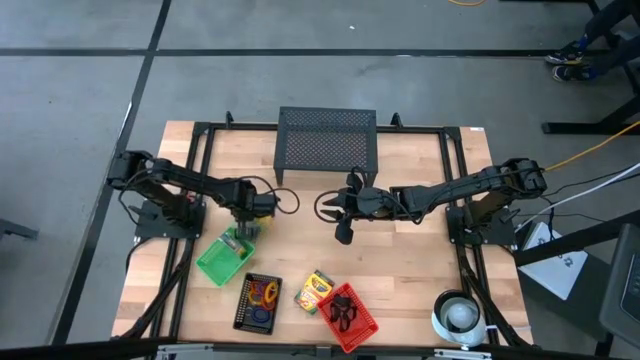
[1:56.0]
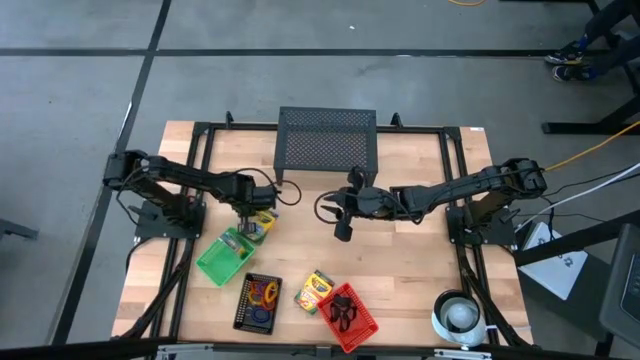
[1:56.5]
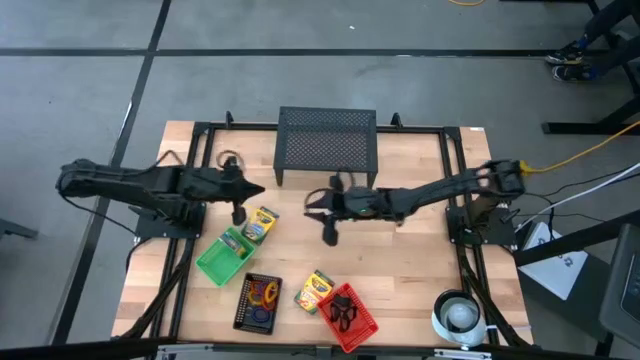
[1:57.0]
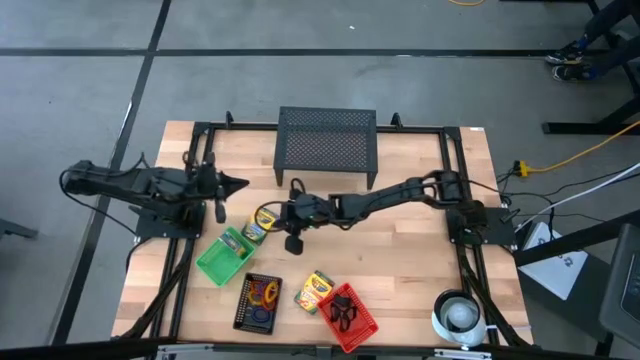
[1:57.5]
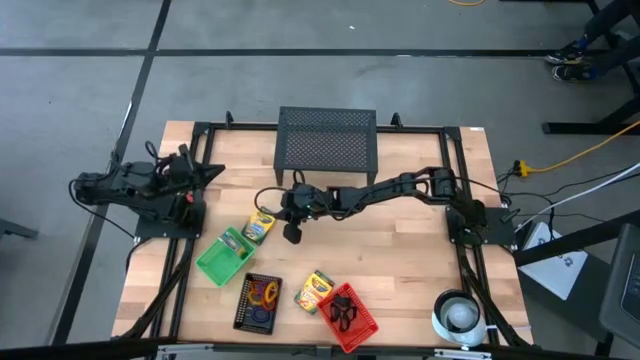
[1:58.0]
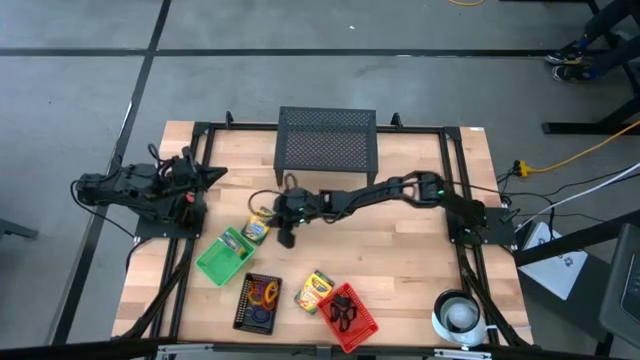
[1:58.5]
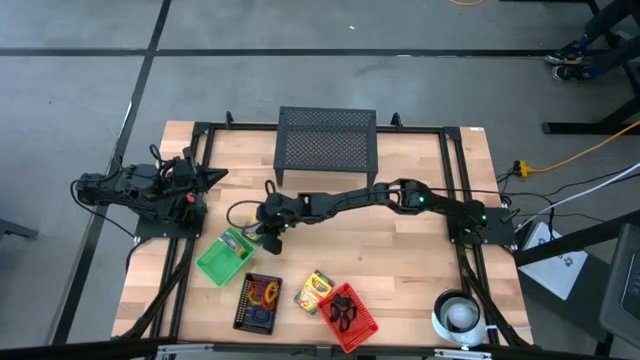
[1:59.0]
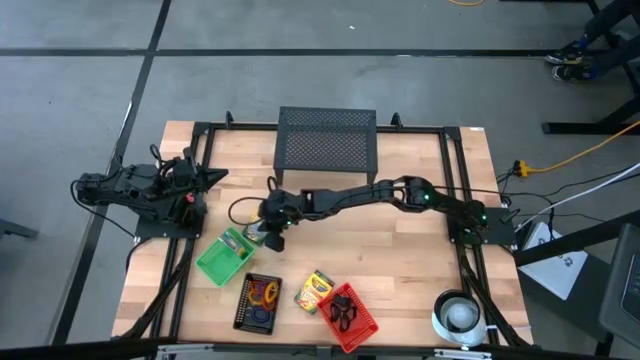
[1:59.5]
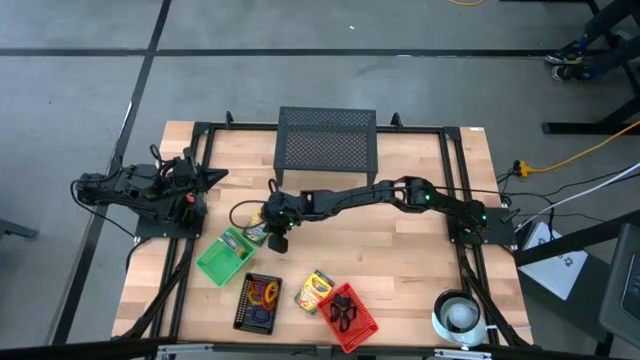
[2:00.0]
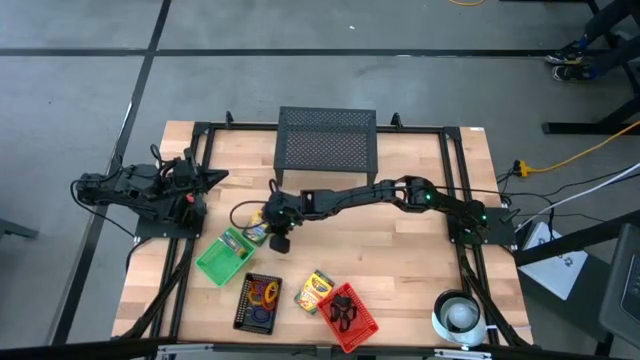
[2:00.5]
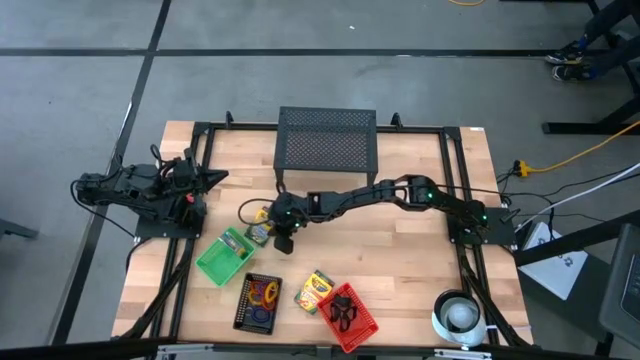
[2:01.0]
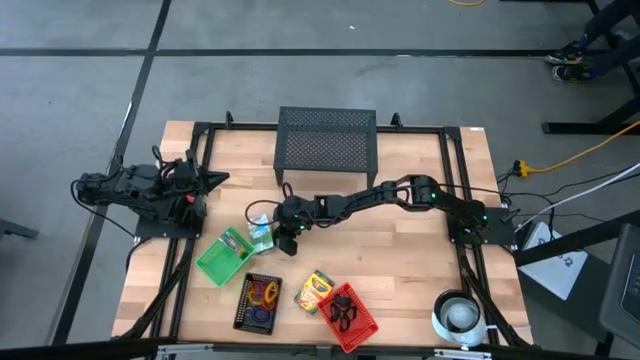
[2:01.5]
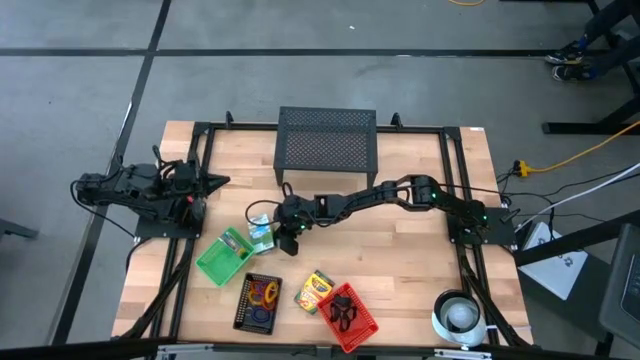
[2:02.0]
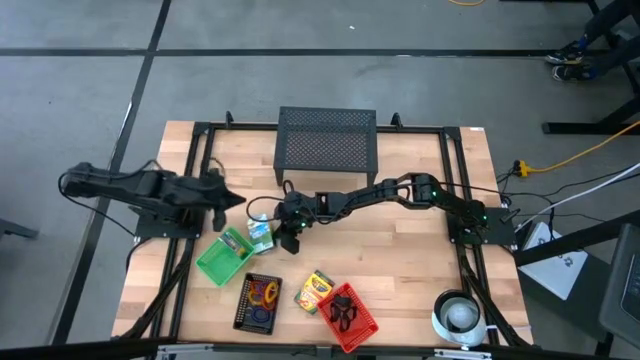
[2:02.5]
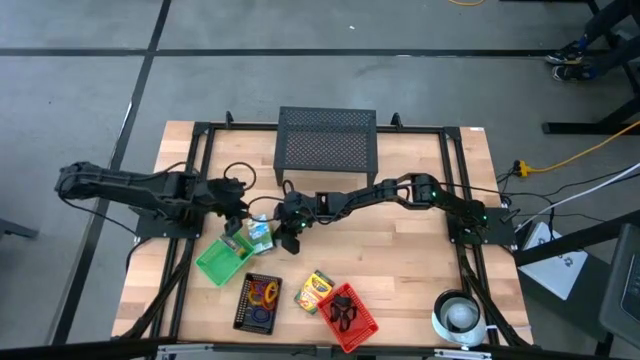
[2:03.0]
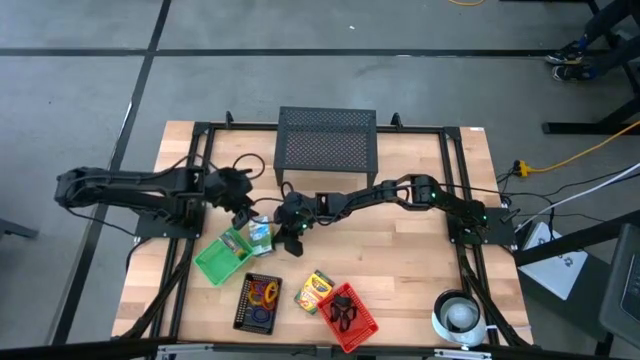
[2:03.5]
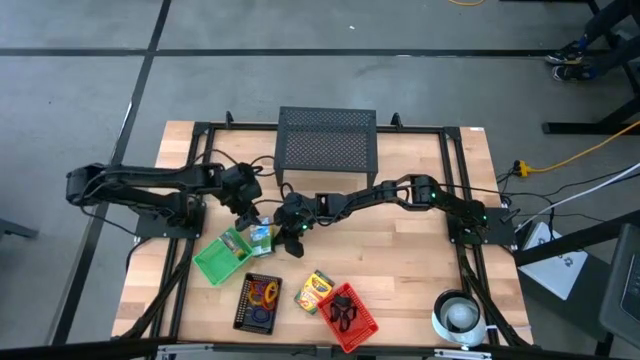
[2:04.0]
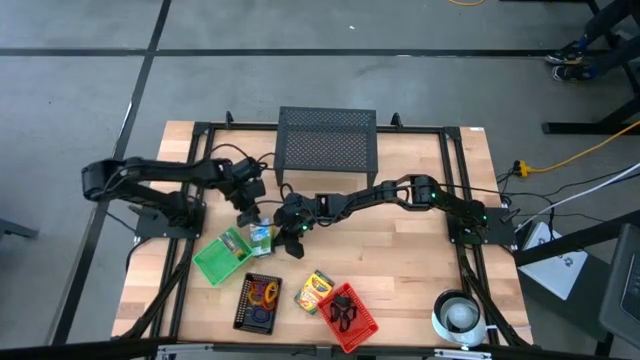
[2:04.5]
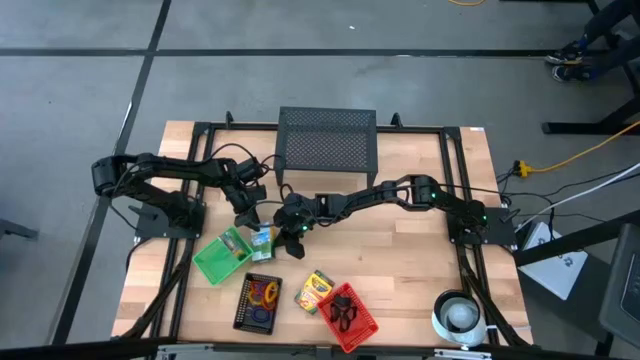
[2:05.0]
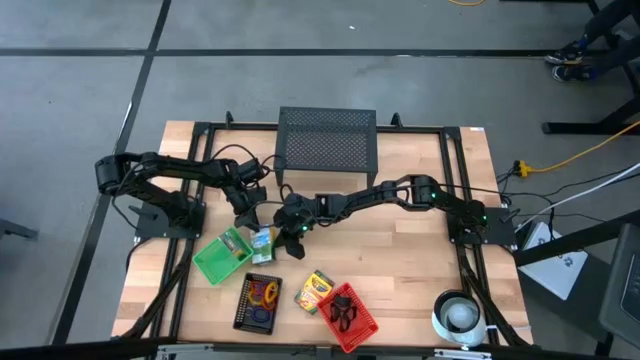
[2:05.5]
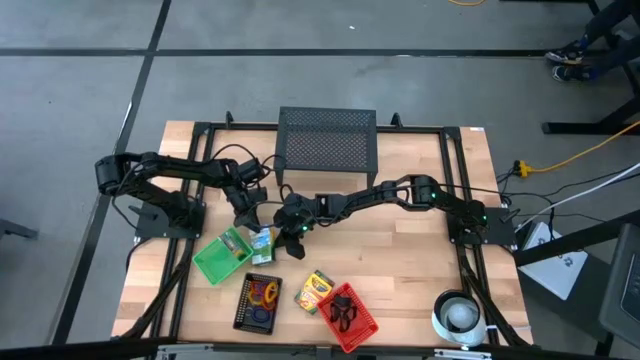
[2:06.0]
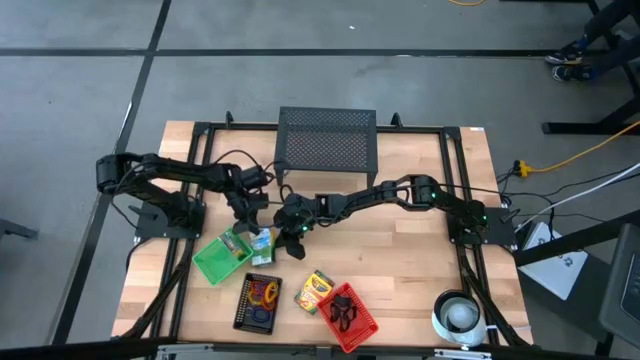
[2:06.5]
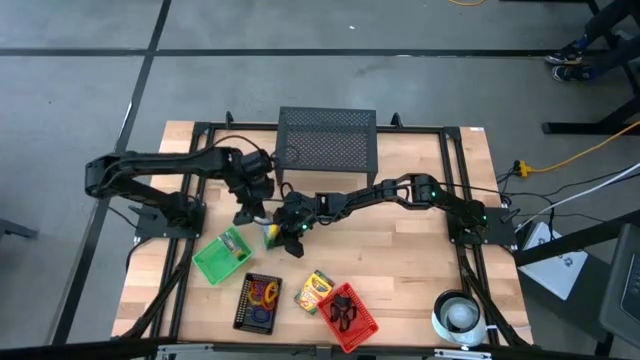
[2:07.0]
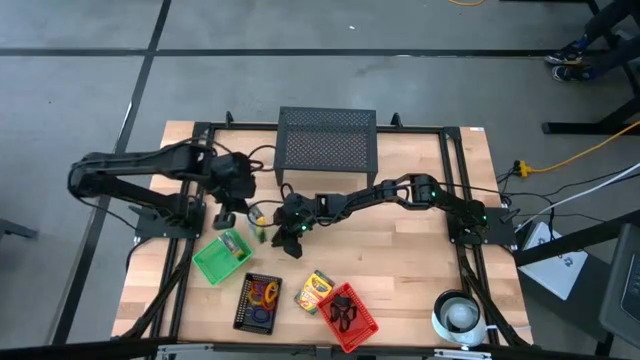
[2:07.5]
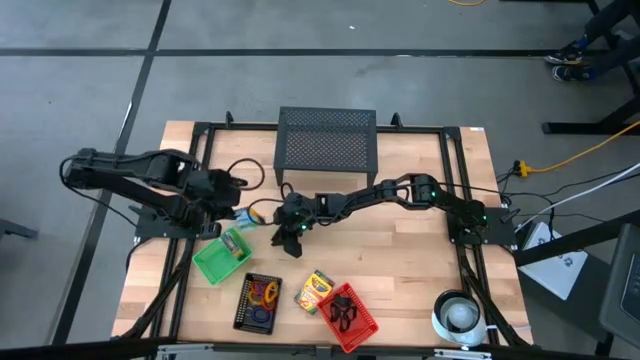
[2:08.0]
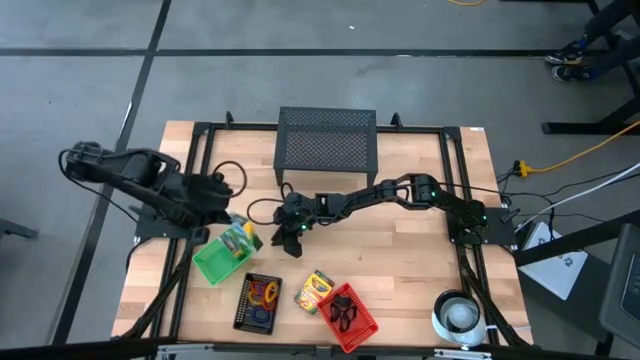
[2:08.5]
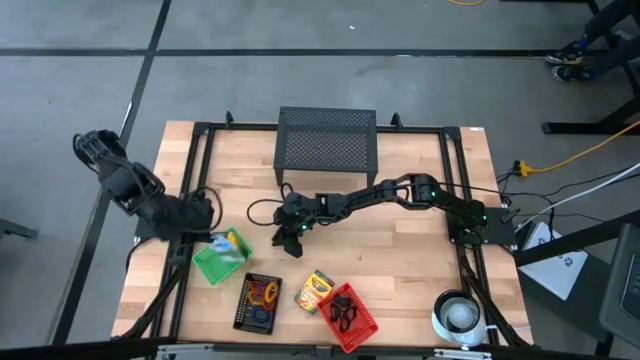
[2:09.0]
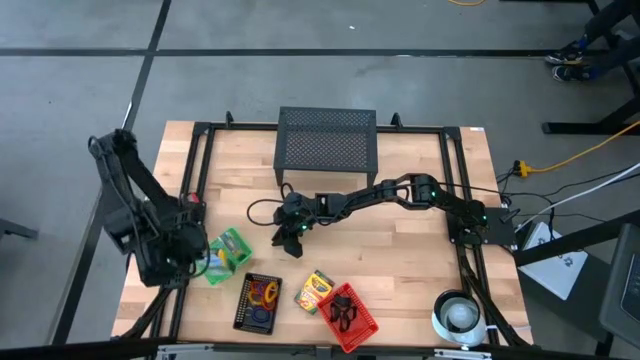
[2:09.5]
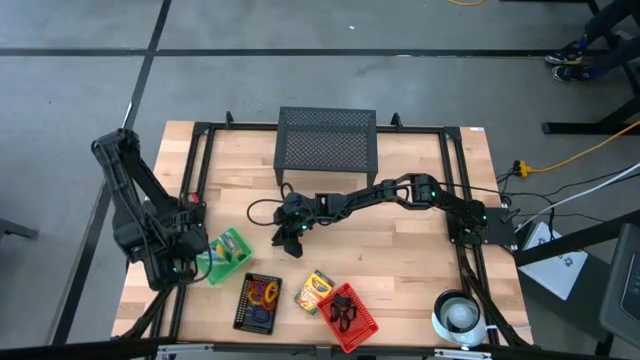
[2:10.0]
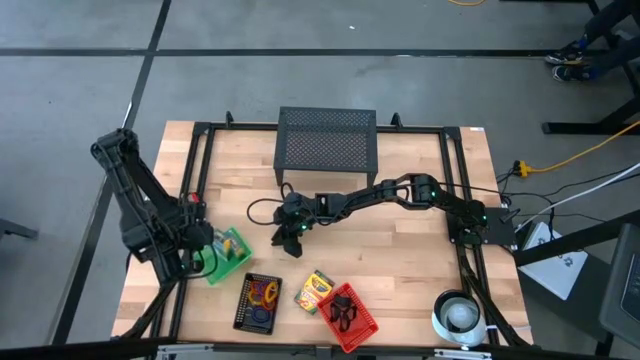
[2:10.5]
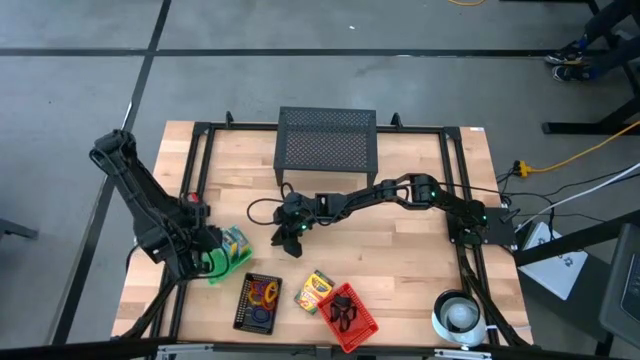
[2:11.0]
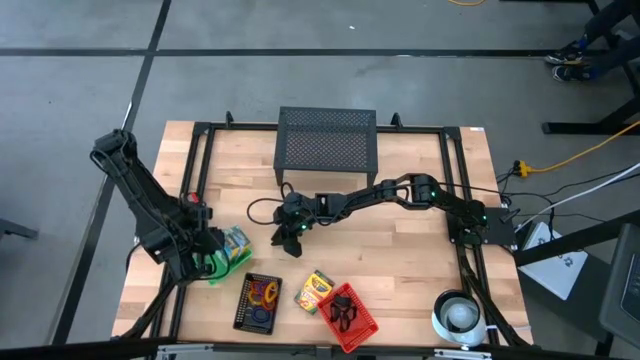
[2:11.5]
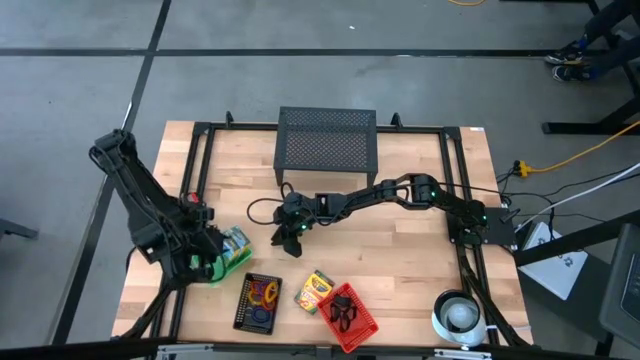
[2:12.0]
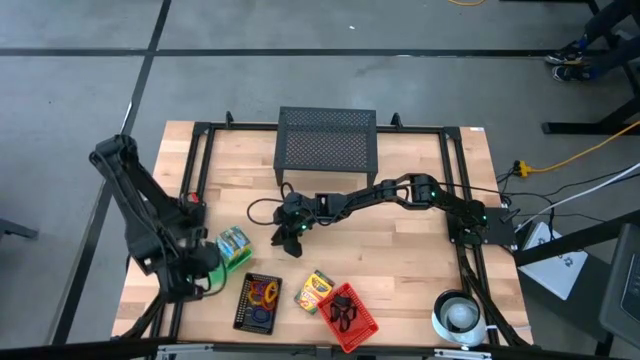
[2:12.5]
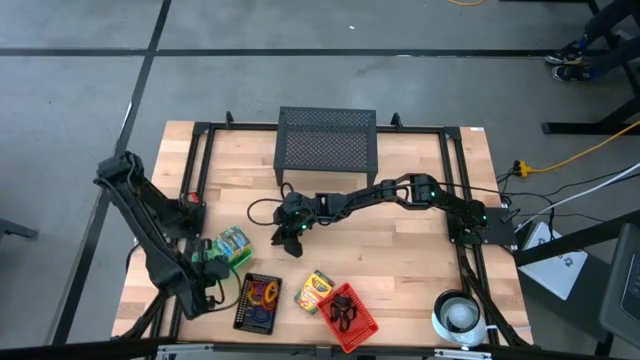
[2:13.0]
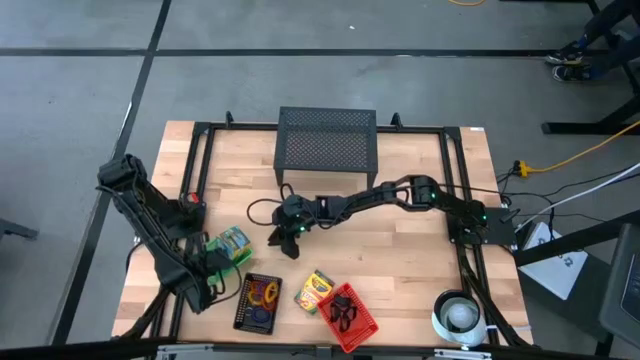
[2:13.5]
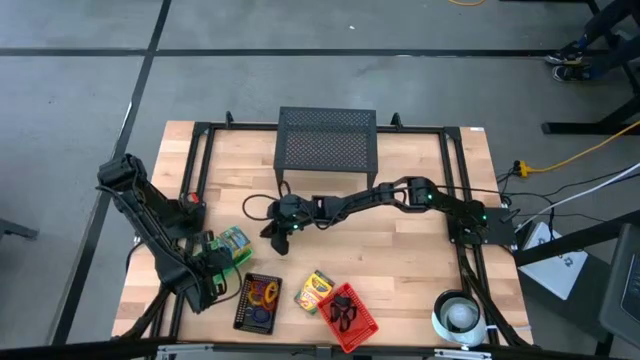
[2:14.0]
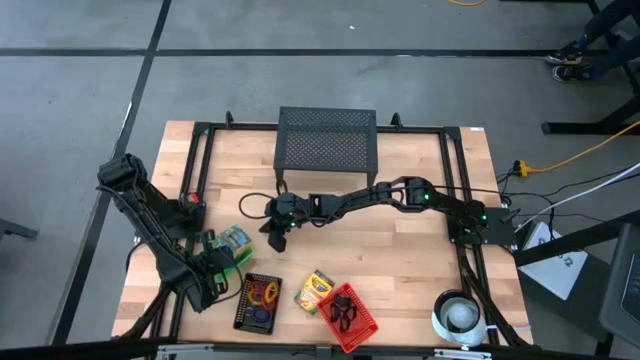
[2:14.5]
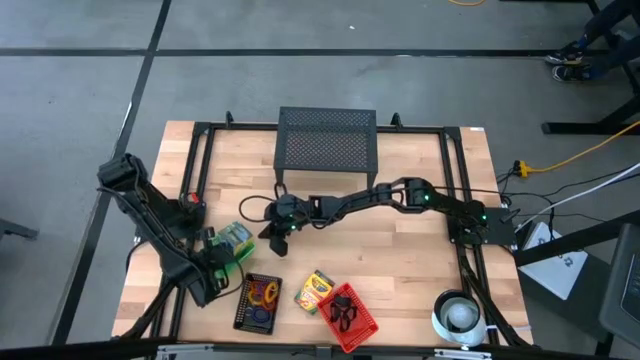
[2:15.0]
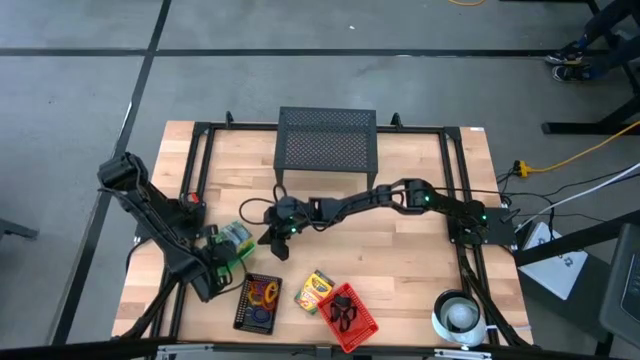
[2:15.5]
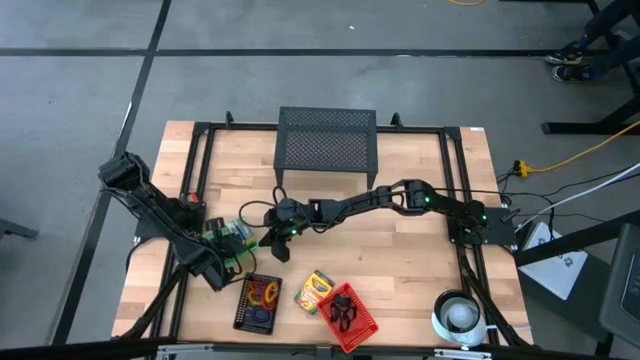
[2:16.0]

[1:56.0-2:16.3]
Task: Pick & Place Office Desk Supplies
Put the yellow crayon box into the green bin

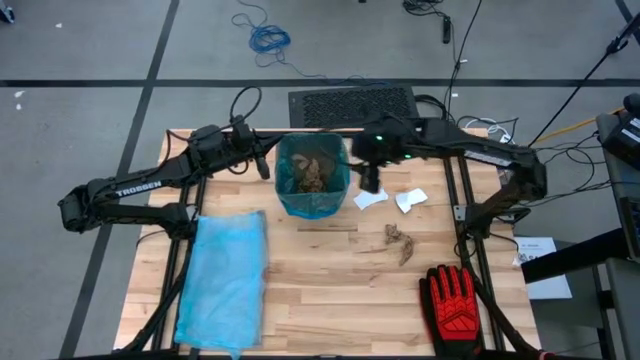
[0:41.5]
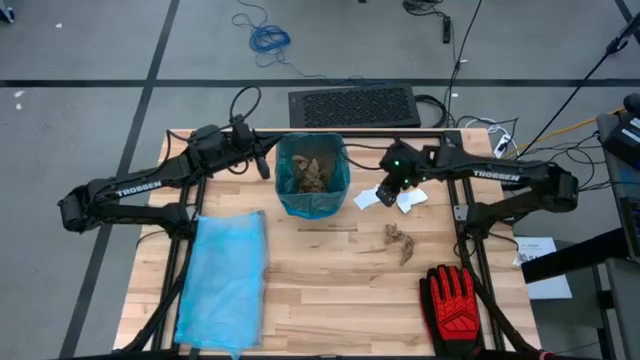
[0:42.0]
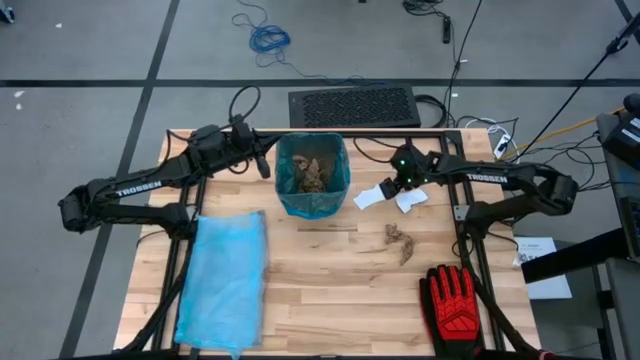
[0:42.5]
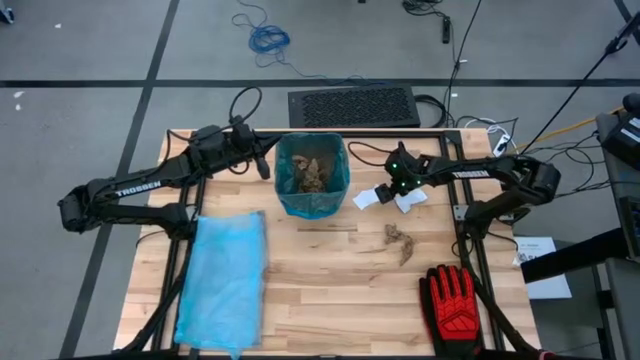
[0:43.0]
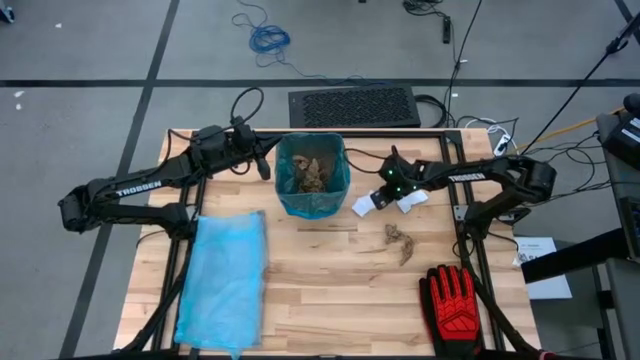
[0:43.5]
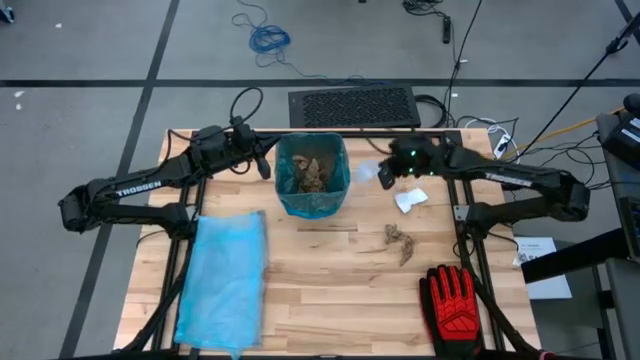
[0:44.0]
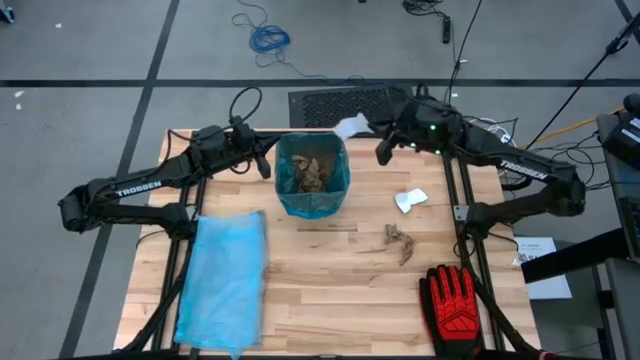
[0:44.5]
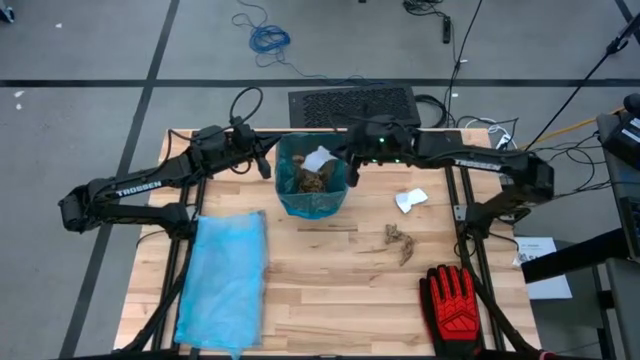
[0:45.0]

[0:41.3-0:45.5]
Task: place trash/remove bag and relplace
Put the white paper into the black trash bin
